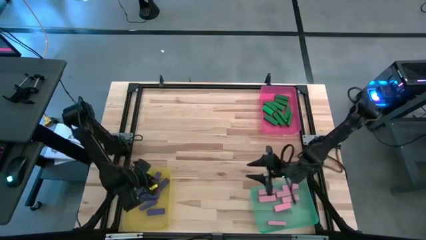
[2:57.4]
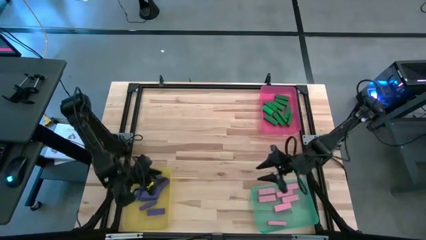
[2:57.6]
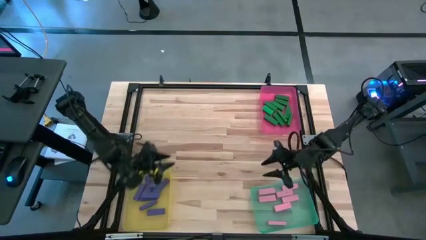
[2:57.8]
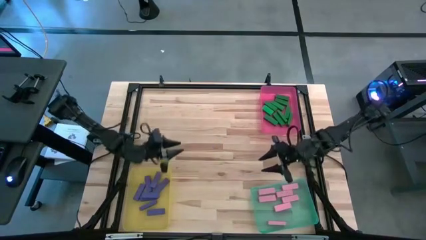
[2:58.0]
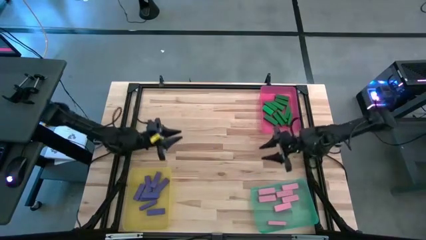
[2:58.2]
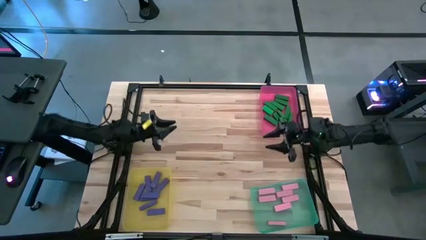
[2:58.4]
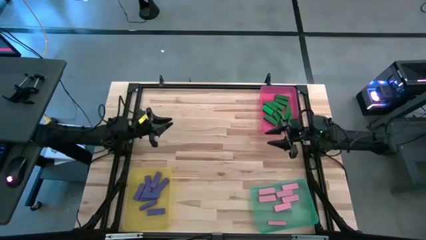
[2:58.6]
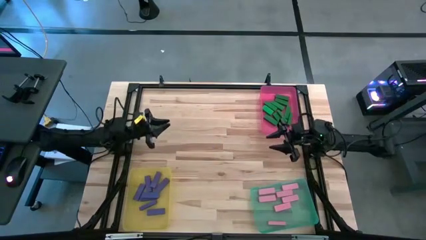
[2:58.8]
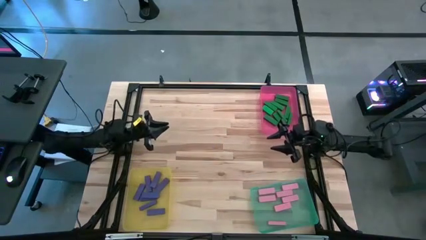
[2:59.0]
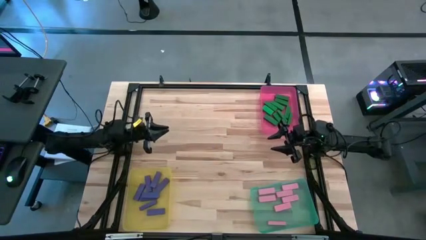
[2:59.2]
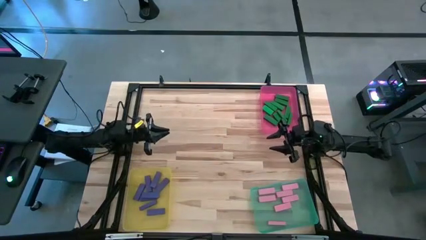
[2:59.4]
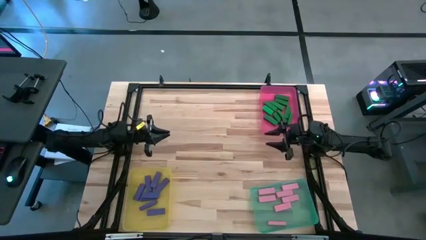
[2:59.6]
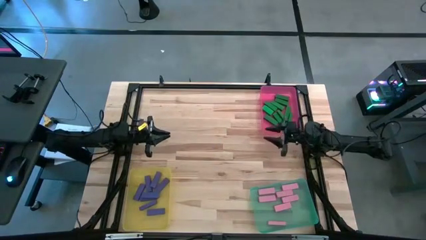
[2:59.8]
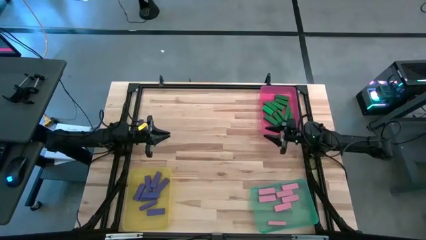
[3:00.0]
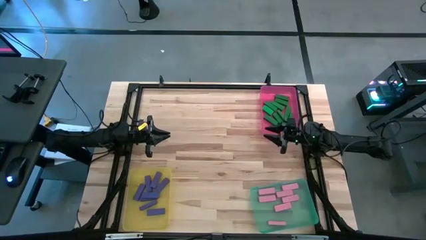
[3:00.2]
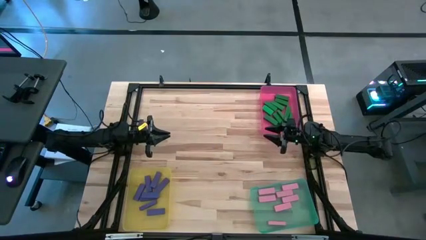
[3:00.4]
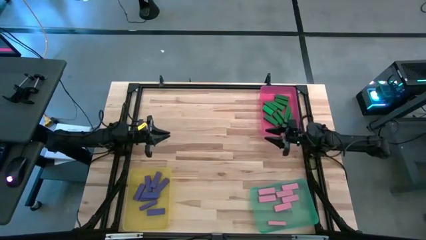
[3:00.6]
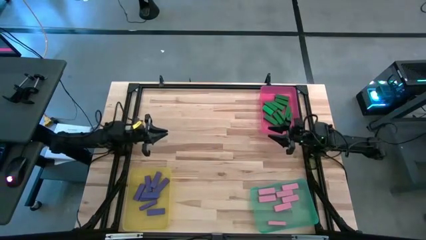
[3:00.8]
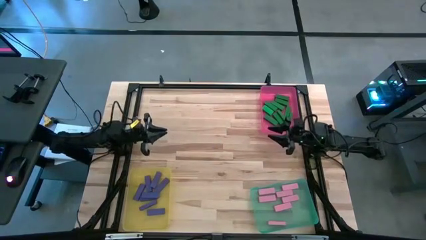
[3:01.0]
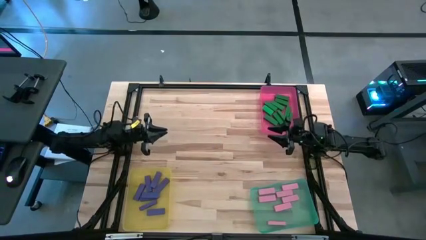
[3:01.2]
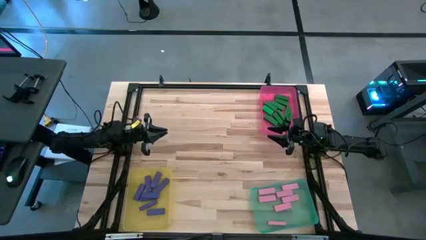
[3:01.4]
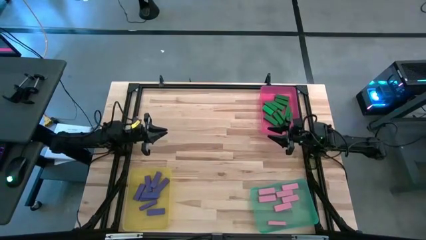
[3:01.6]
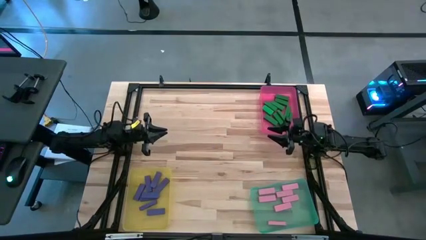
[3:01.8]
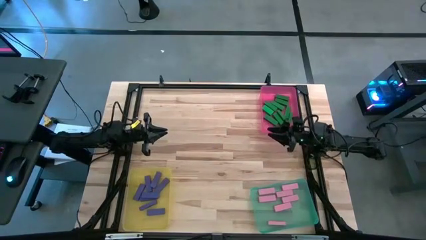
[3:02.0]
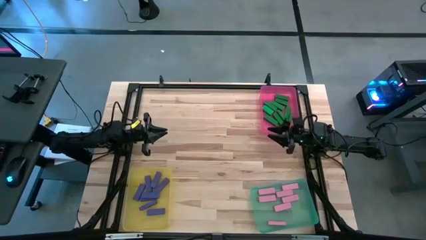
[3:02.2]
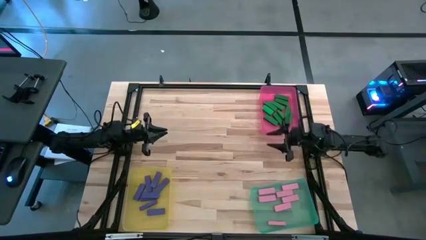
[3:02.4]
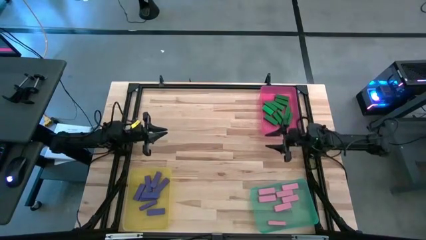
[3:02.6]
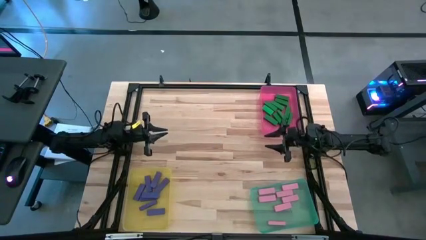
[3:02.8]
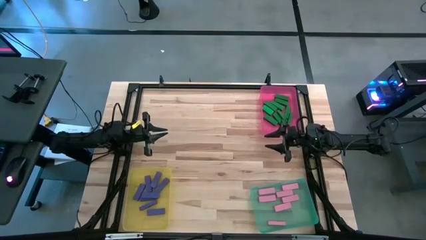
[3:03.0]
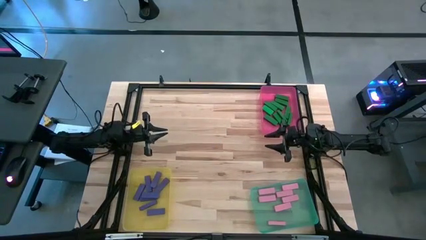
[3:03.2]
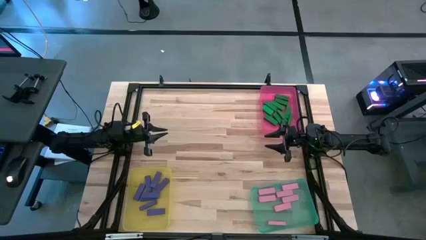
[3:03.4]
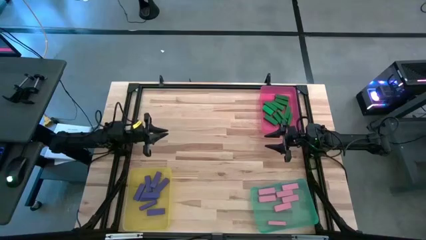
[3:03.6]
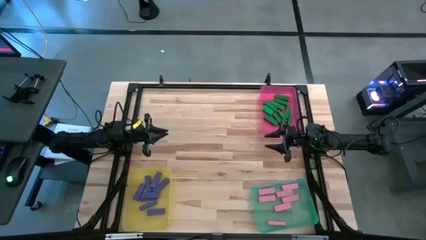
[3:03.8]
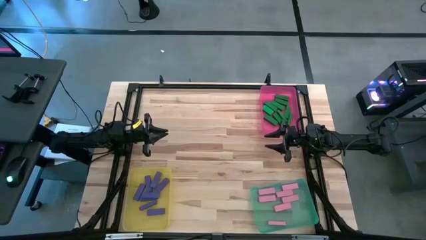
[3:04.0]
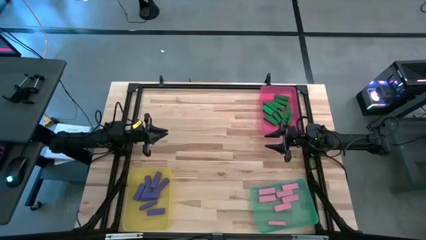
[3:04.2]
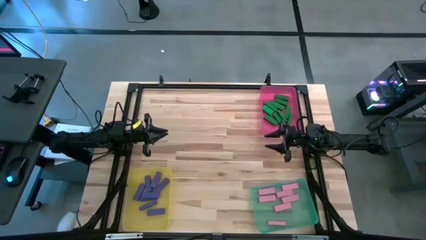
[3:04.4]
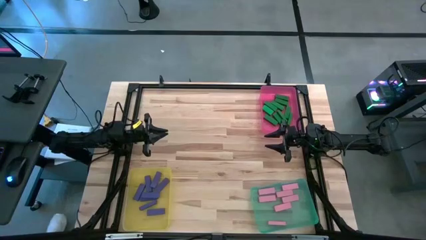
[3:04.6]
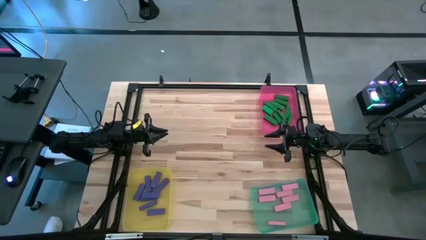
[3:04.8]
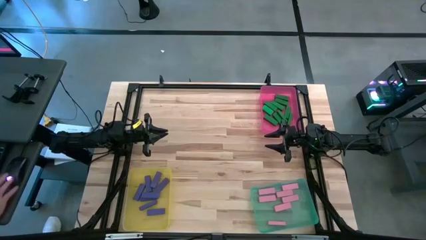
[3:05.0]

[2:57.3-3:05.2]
Task: Sort blocks
Return to Home Position

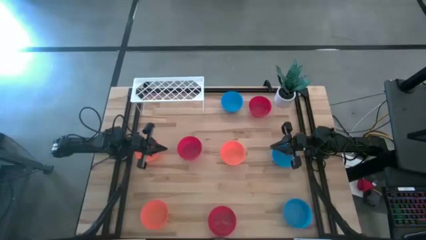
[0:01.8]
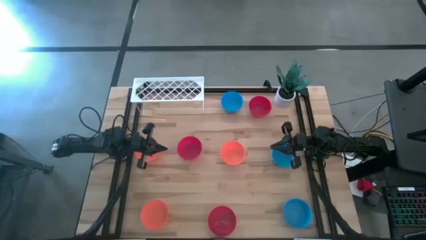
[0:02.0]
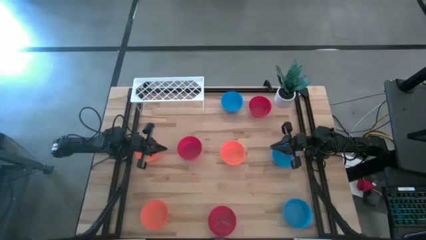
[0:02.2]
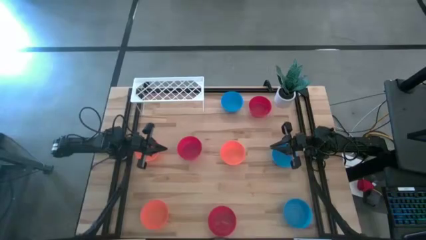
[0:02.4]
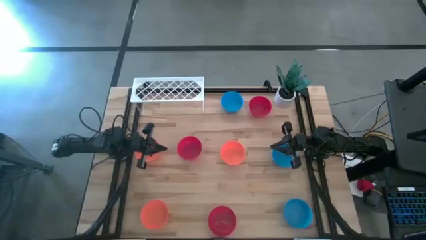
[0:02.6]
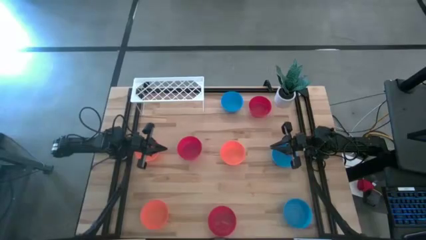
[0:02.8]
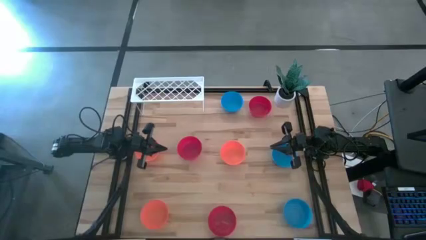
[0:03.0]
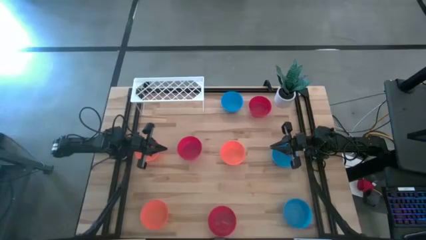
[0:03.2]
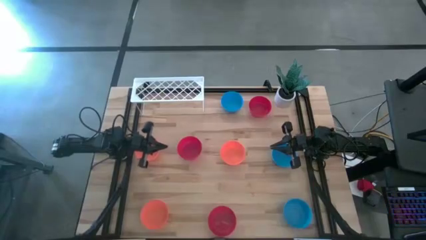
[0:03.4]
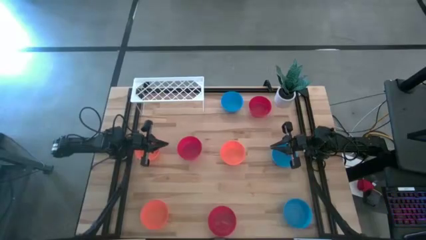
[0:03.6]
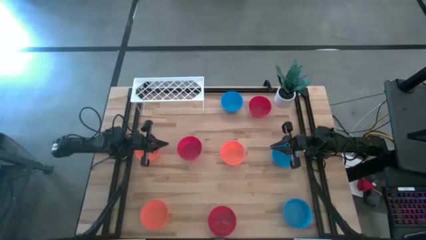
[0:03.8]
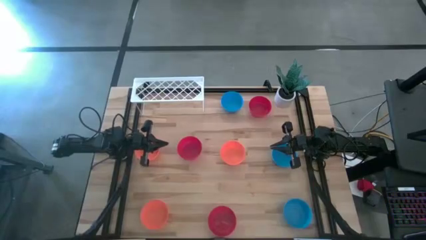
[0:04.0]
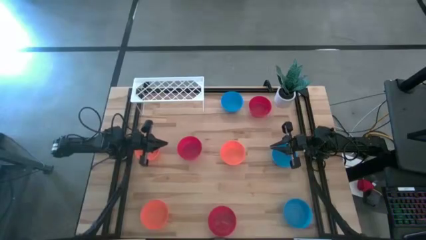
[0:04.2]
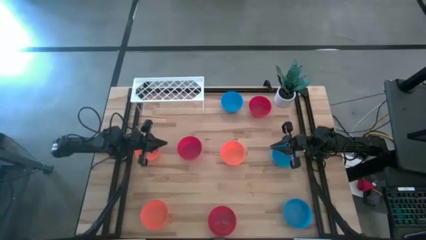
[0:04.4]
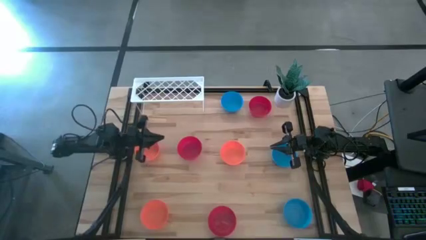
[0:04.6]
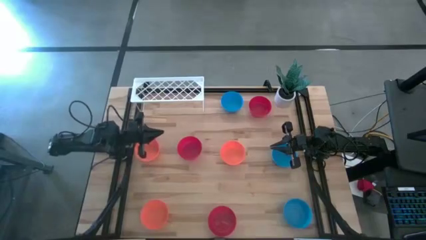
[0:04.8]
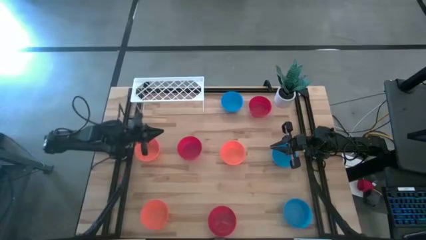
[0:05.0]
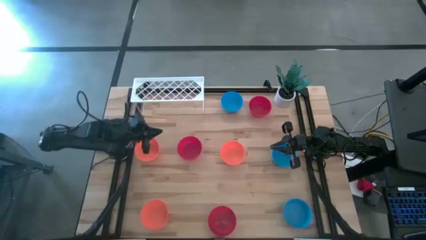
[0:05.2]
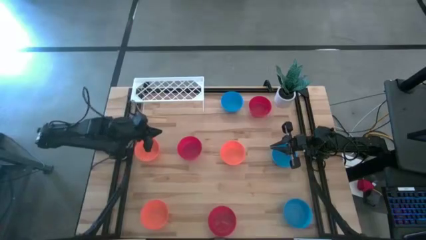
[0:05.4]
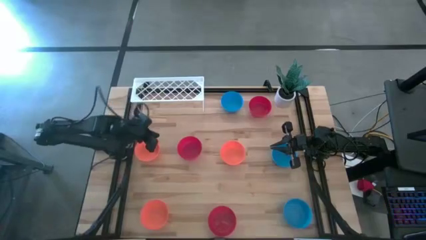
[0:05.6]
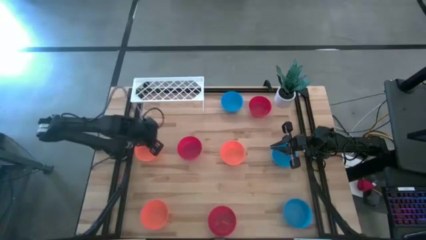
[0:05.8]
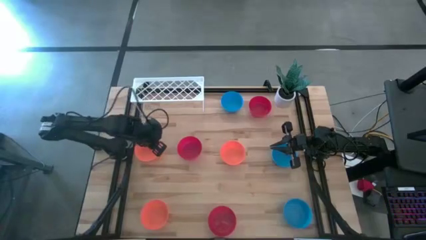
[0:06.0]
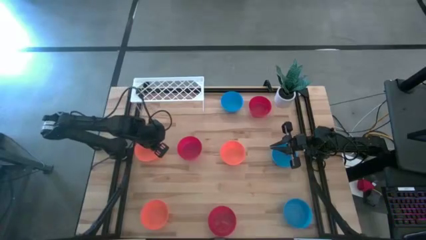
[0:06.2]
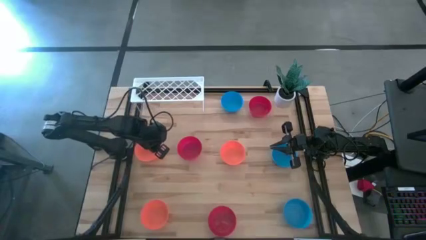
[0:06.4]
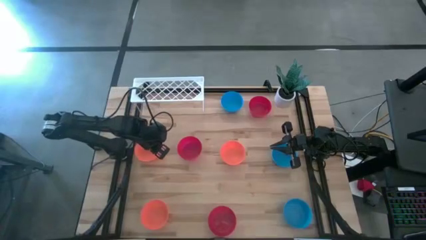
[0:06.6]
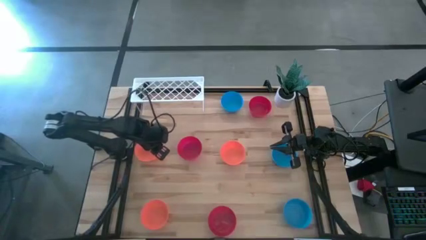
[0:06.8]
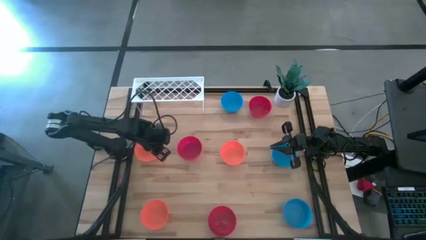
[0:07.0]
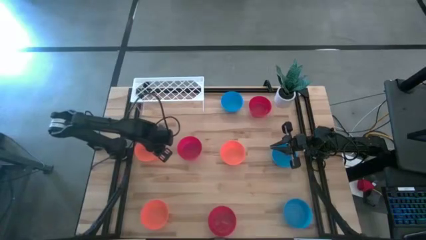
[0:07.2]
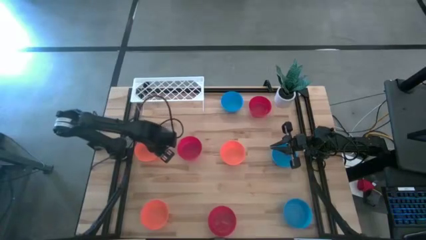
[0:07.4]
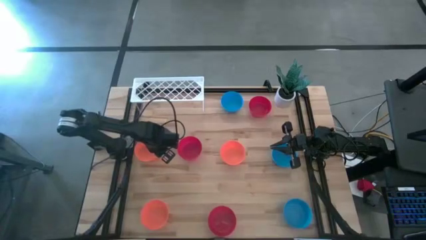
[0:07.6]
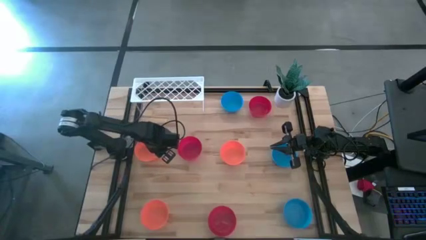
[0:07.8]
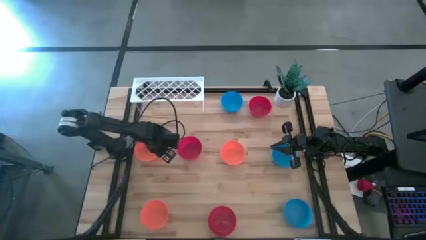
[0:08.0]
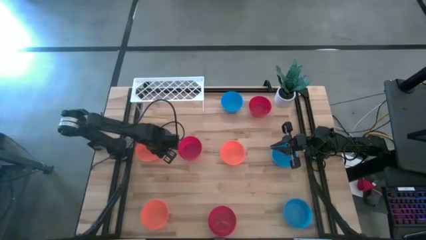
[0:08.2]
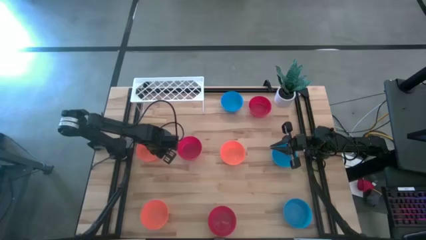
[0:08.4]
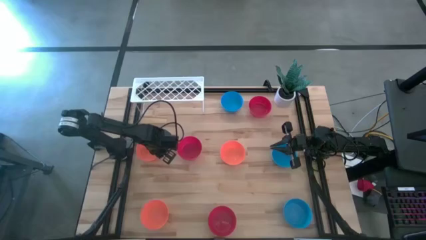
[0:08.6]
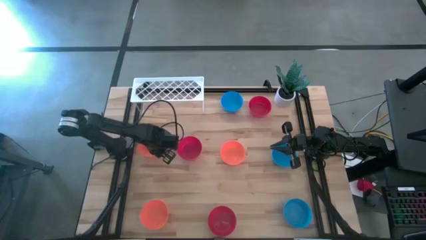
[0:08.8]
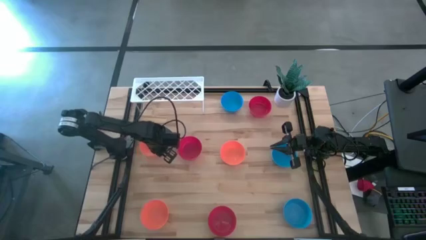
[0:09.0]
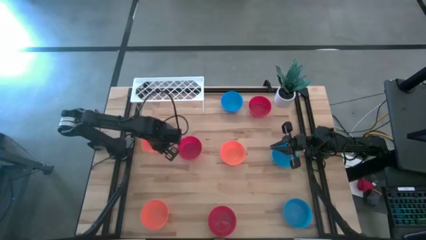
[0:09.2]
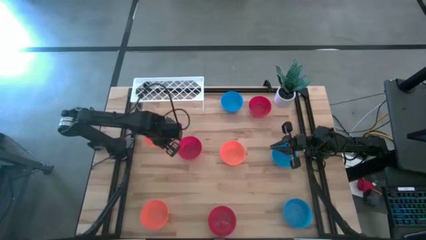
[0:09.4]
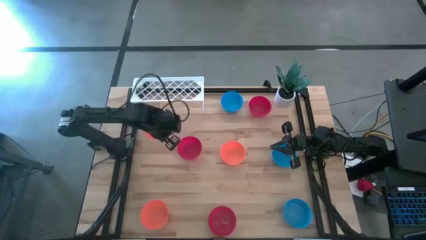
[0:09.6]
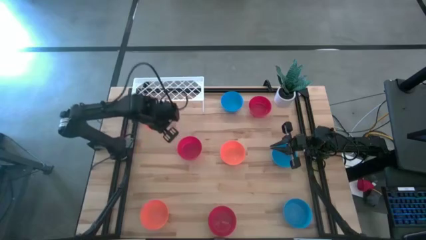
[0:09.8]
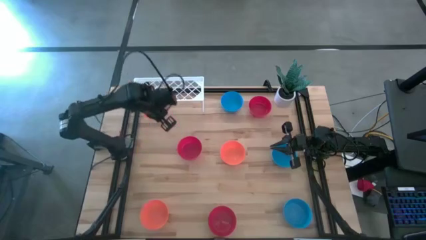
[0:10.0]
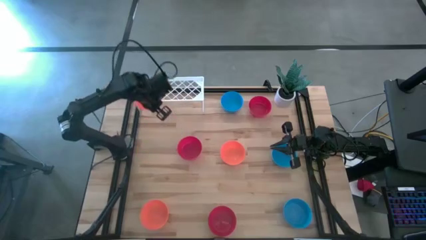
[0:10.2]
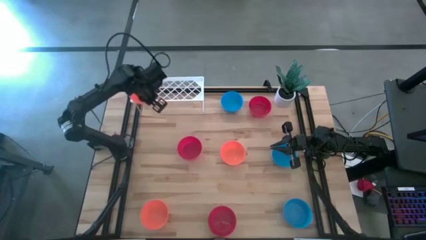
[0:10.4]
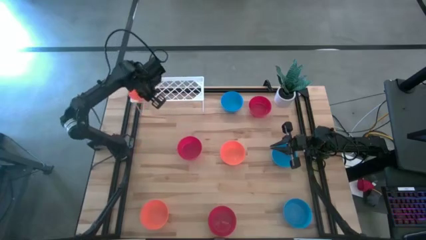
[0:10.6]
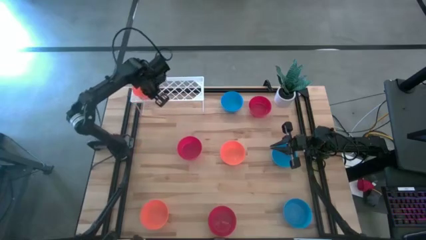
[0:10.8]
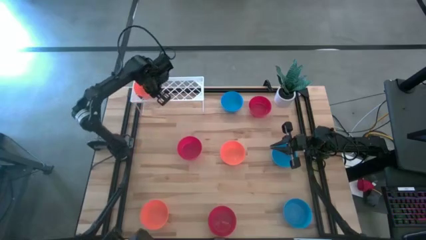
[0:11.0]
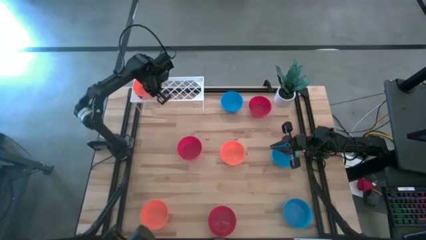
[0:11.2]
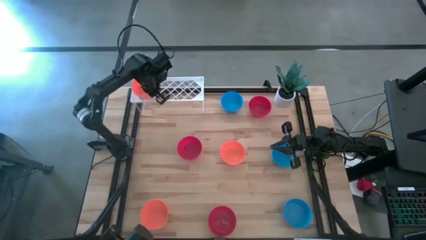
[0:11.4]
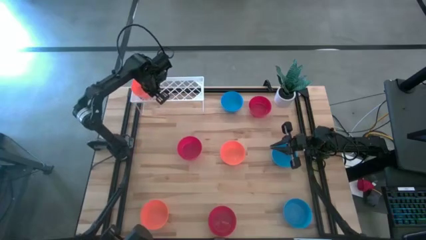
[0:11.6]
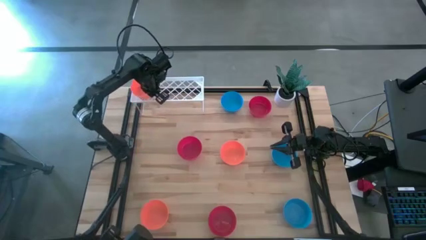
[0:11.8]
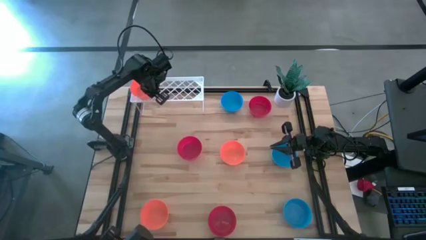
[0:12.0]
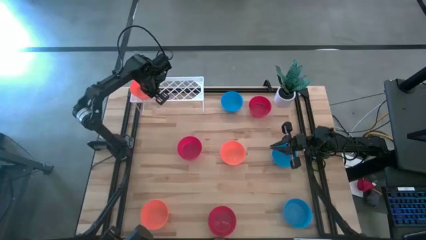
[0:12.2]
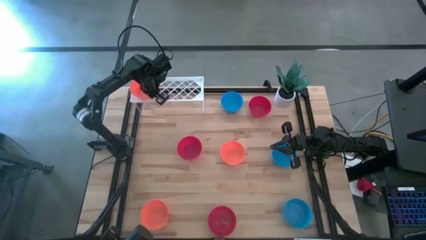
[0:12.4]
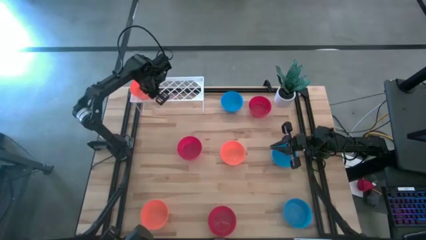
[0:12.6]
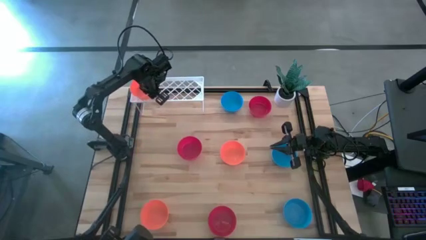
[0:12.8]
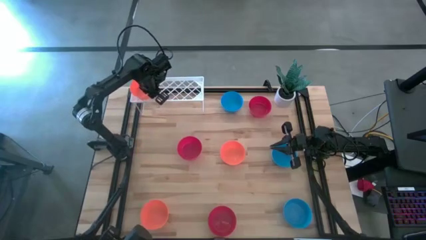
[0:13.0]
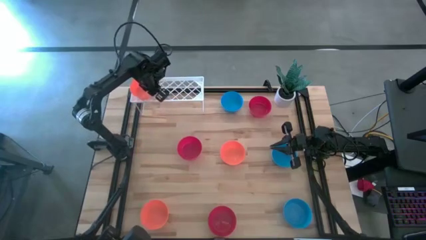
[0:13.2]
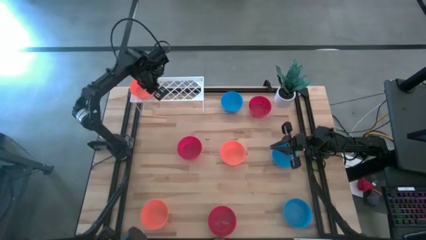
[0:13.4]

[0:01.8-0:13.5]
Task: Pick & Place Mini bowls
Put the top left orange bowl on the shelf
